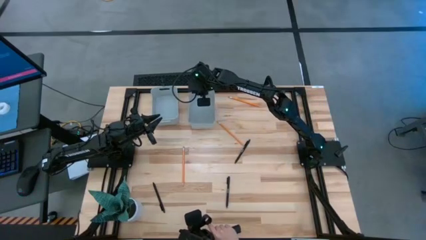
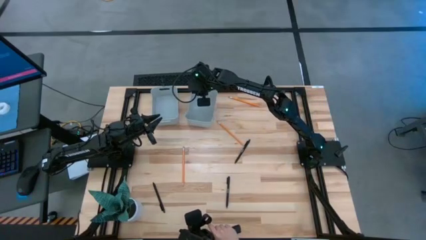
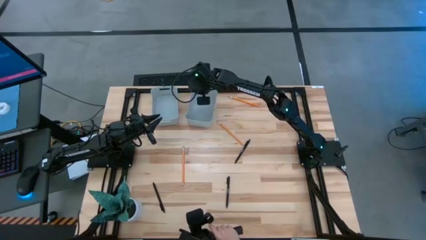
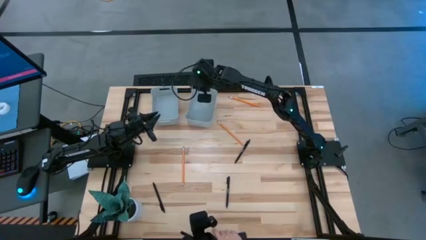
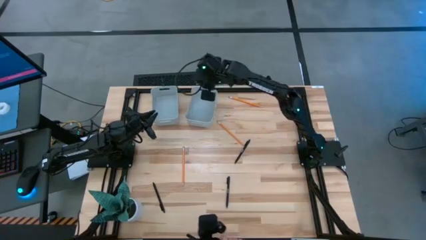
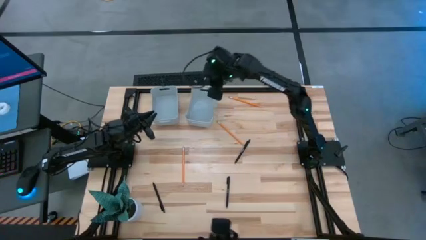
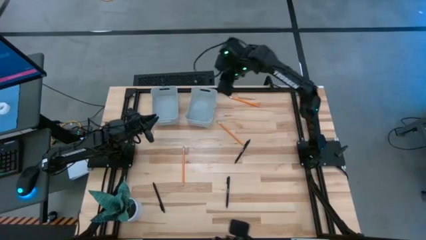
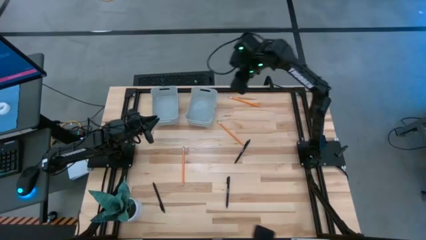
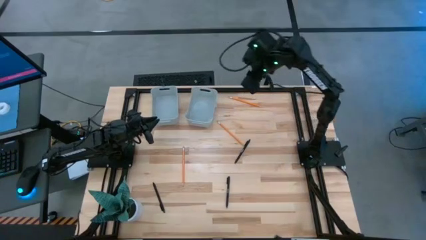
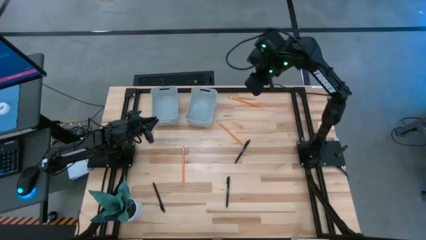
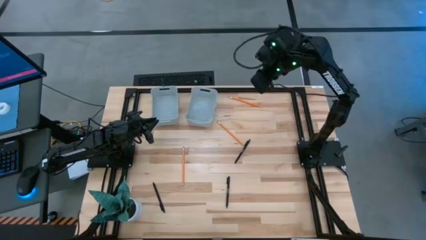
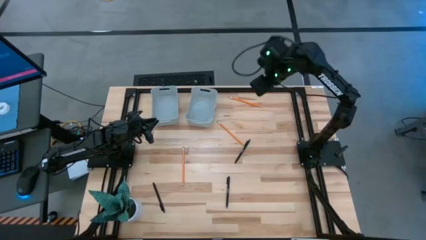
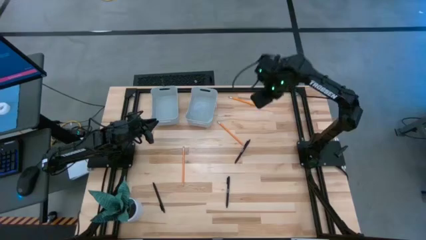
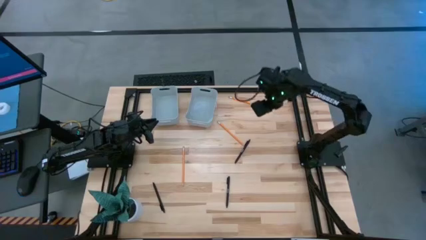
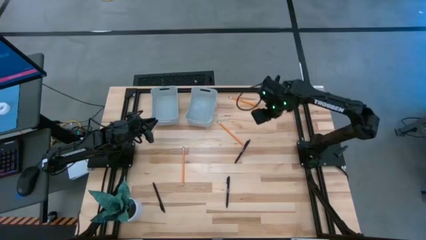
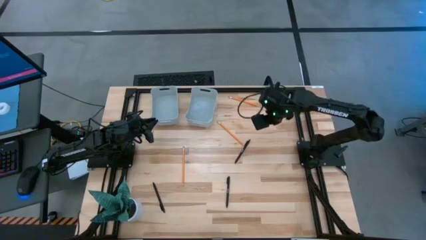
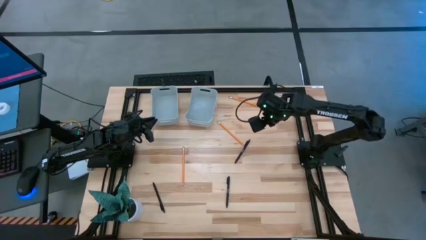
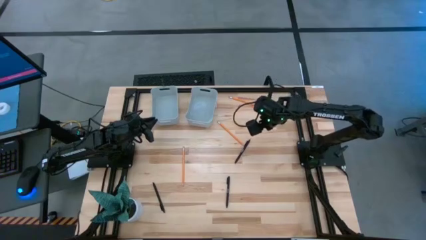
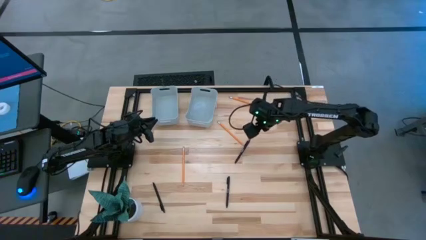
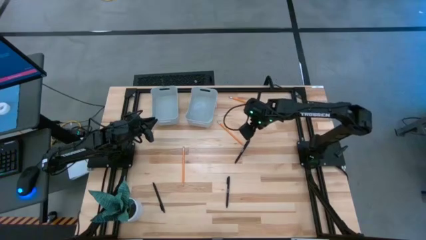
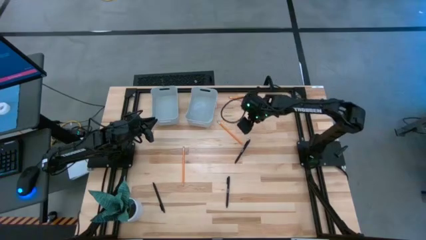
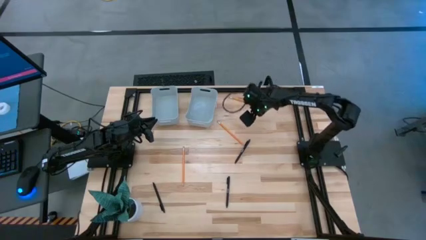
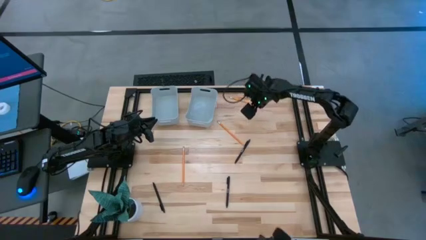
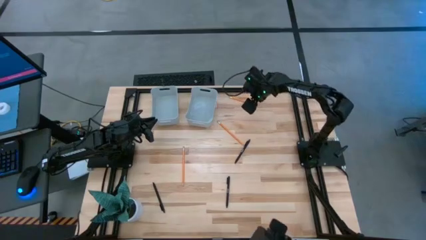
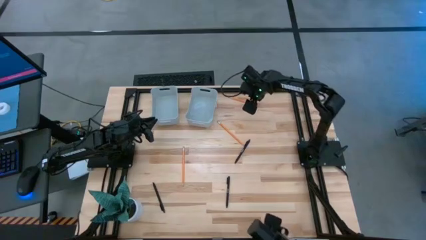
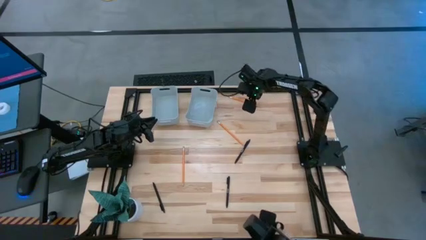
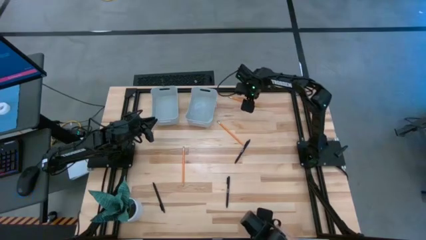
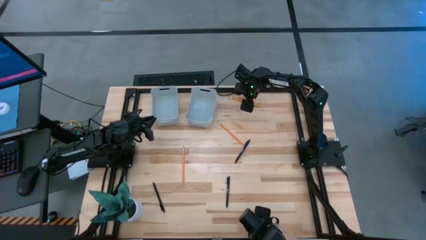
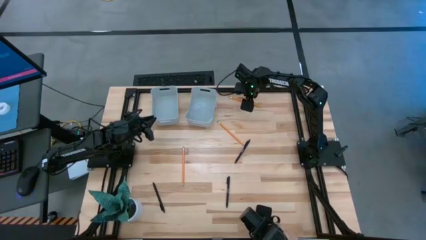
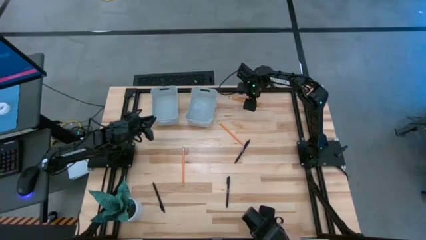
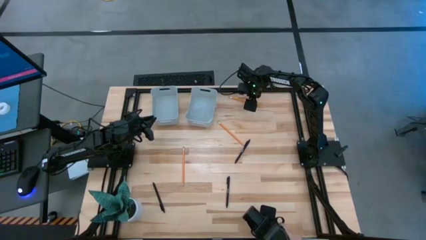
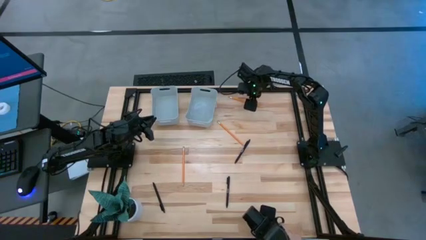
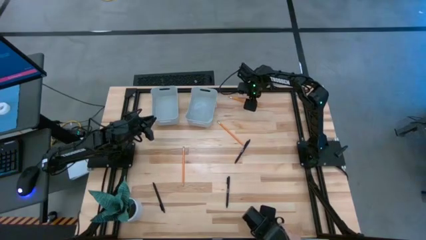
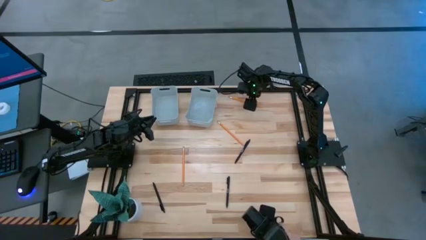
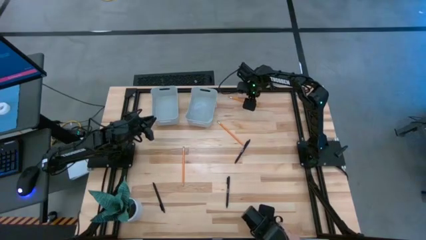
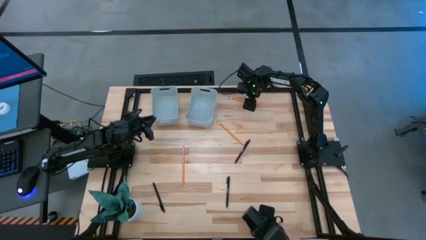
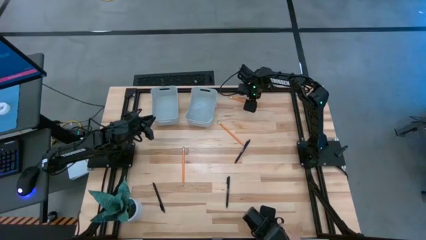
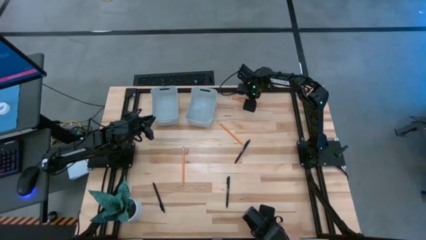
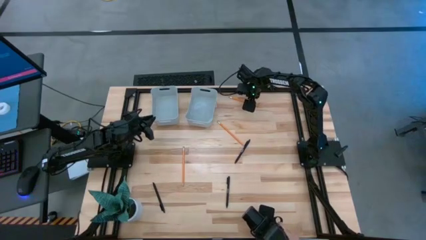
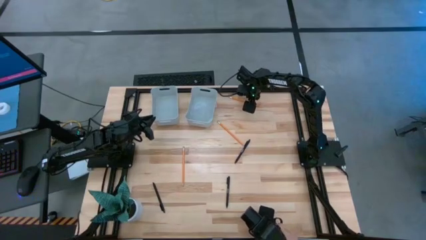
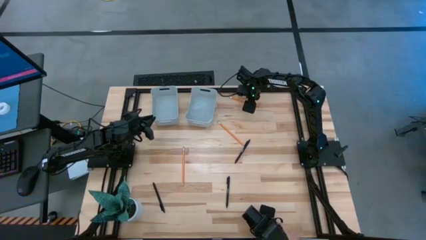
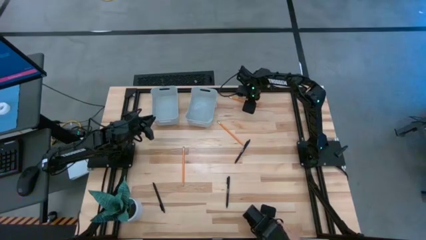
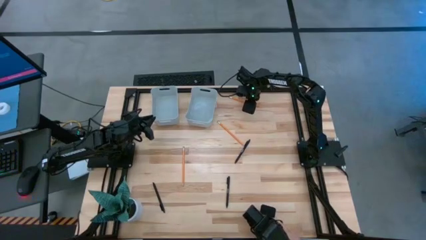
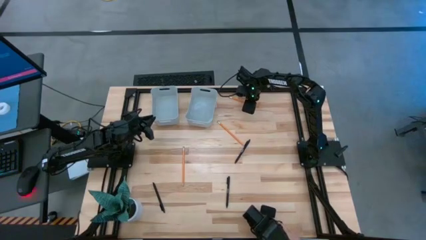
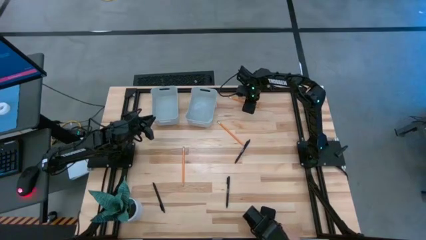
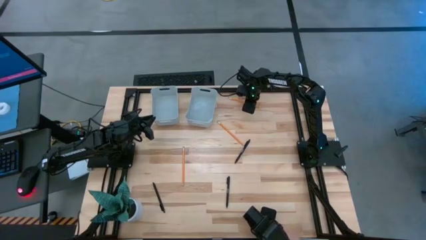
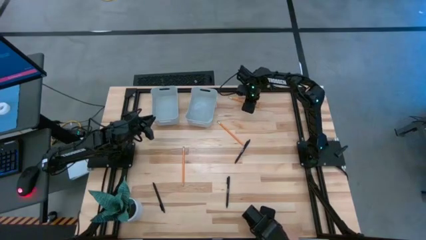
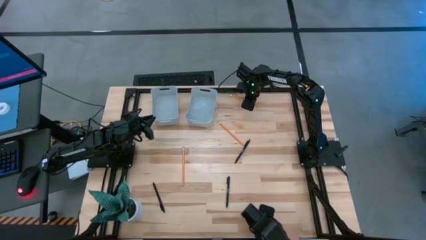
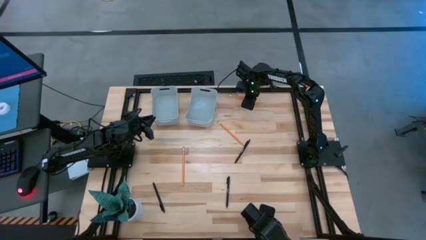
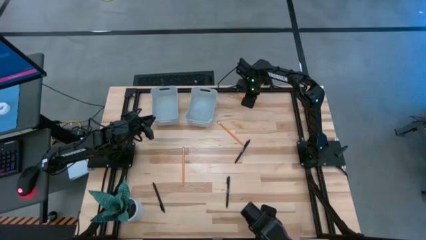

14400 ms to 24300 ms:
Task: Sort pens & pencils
Put the top orange pencil into the right gray bin
